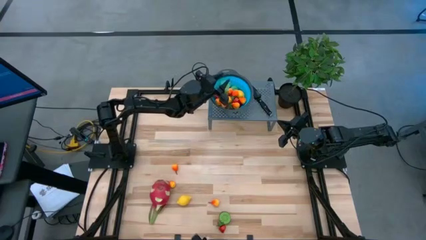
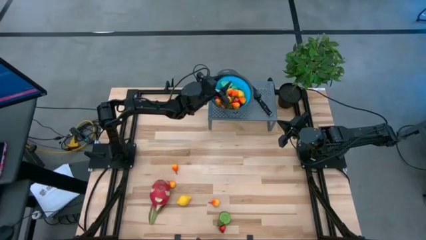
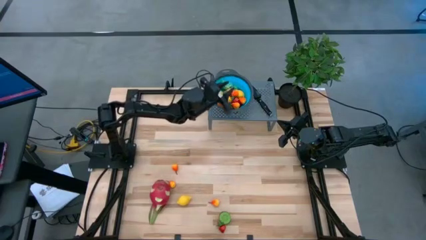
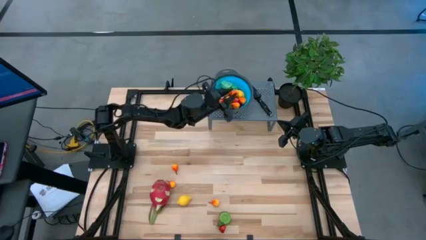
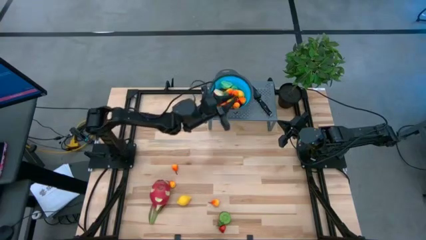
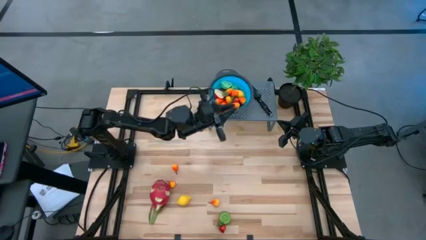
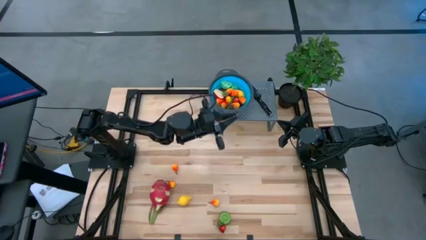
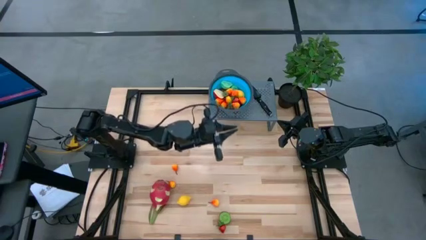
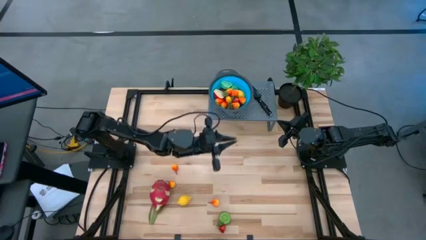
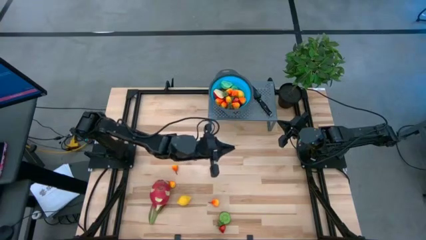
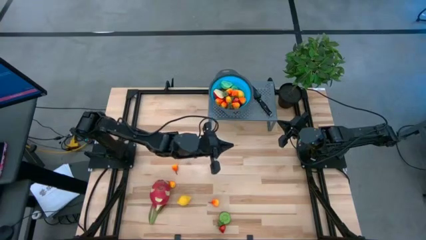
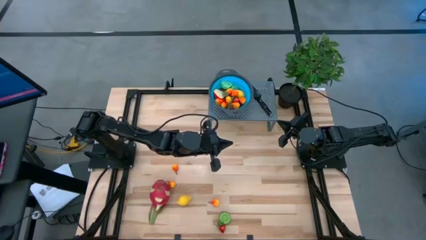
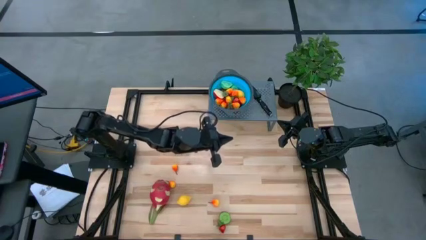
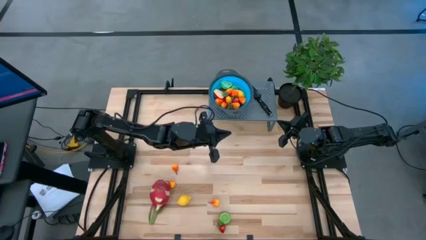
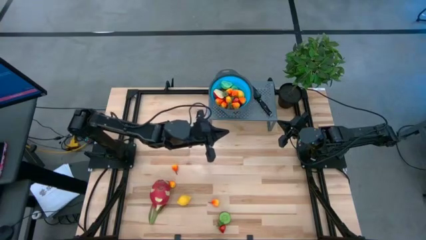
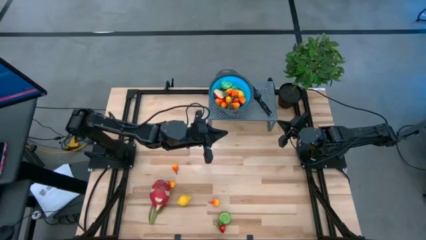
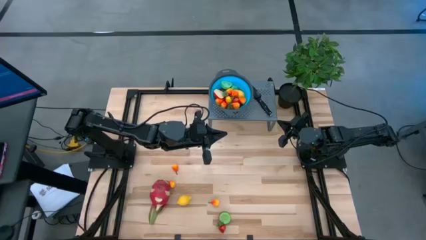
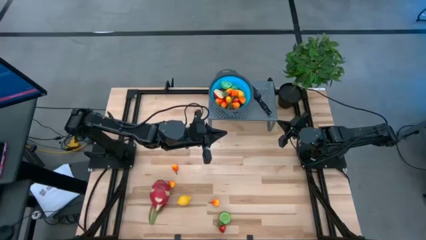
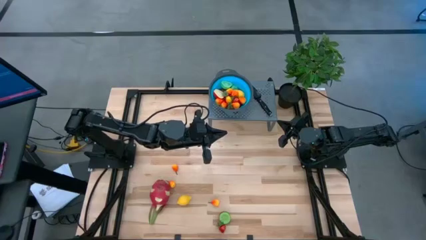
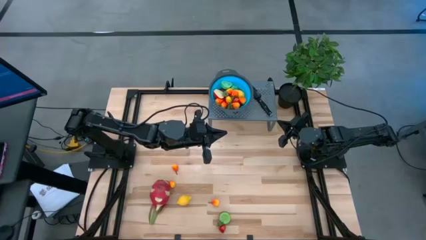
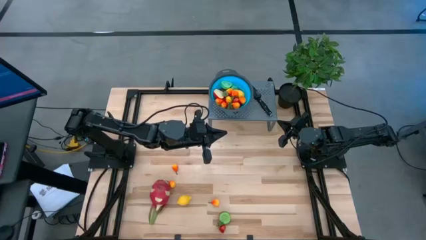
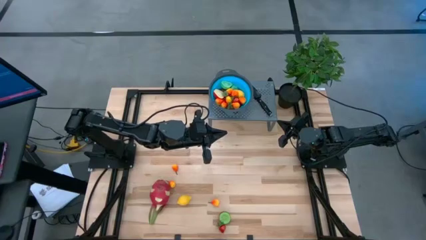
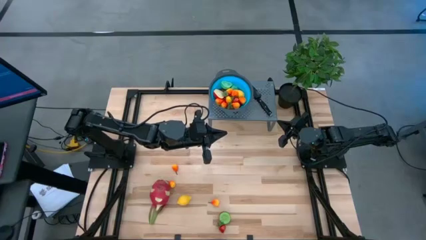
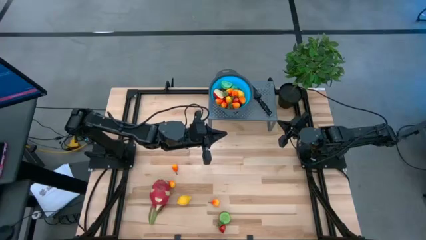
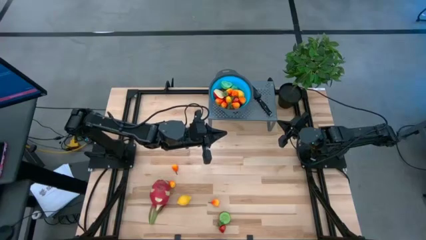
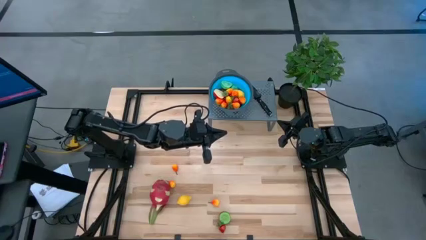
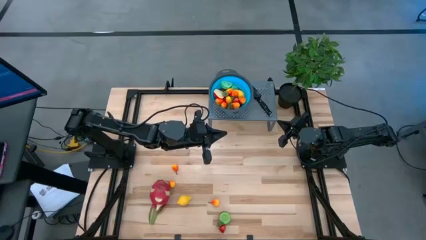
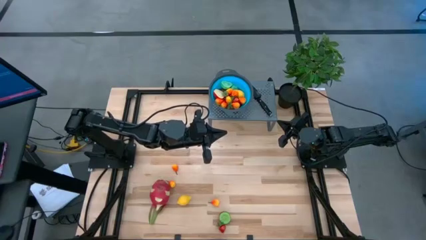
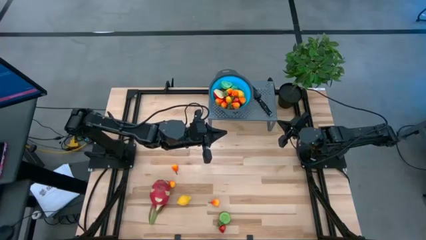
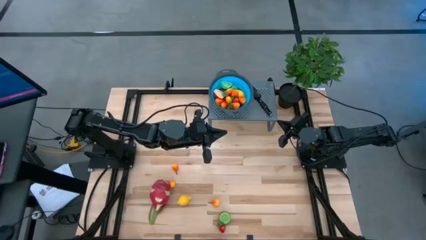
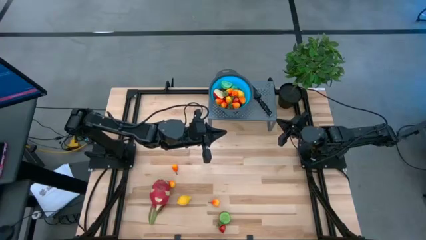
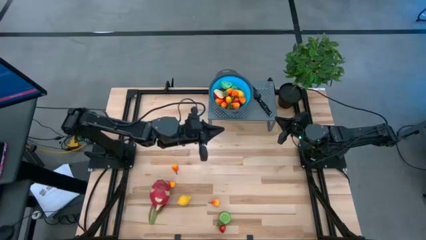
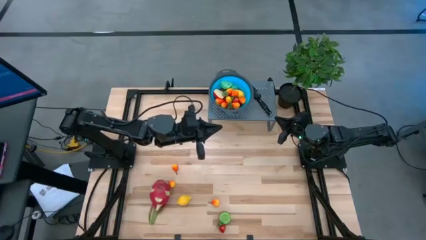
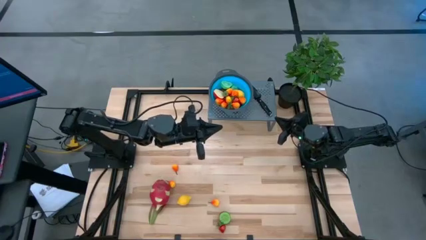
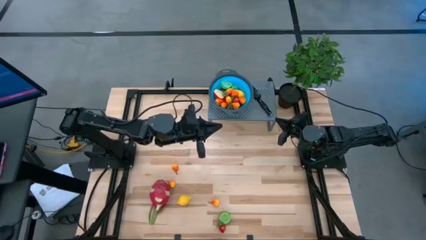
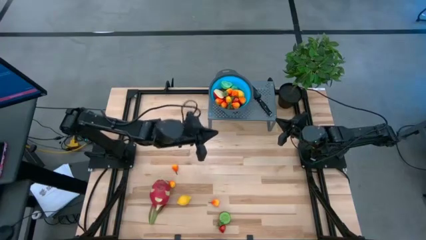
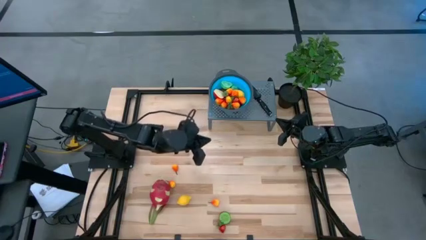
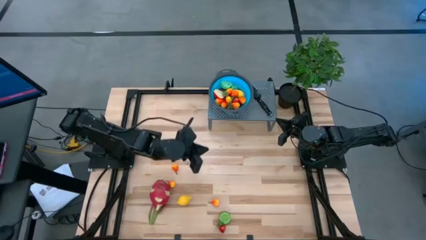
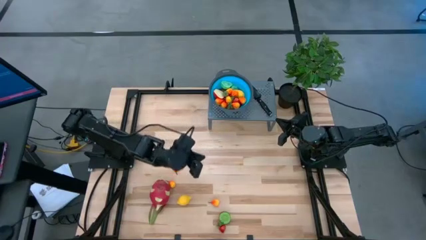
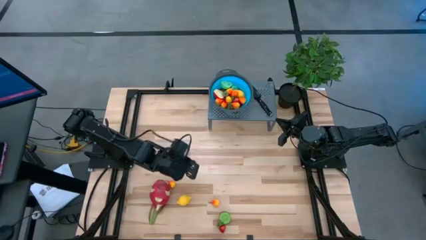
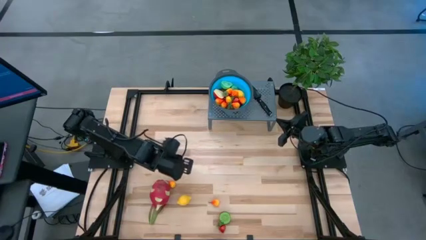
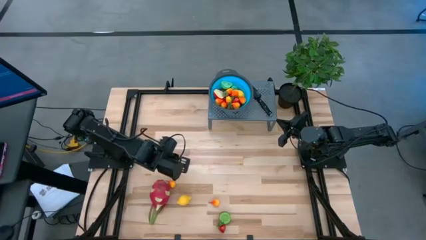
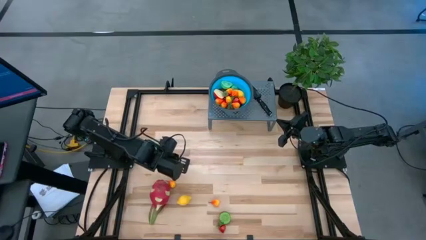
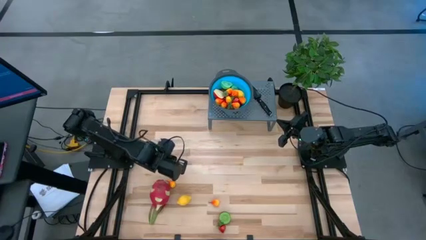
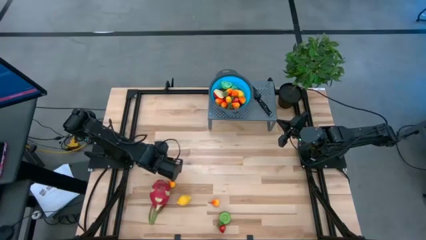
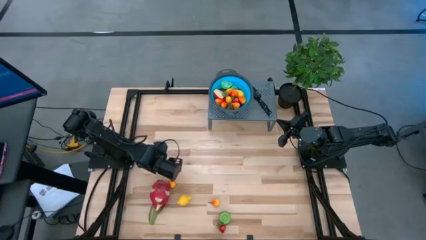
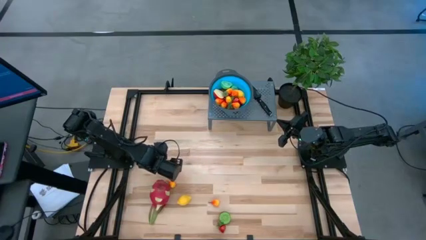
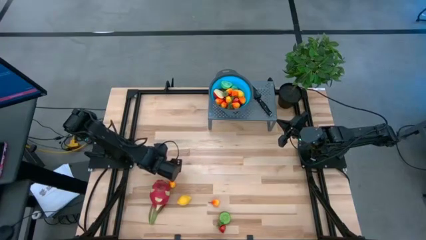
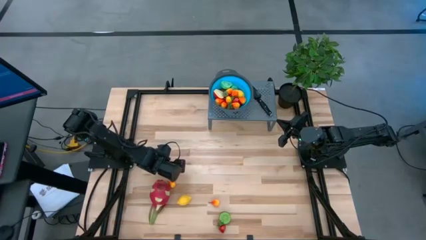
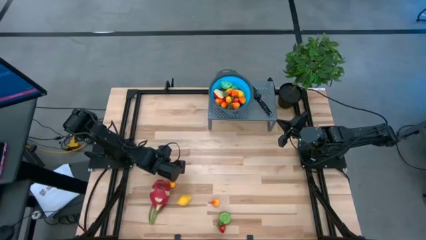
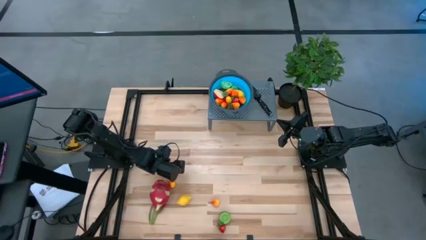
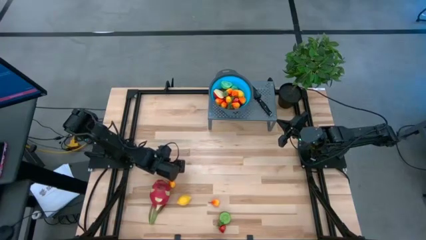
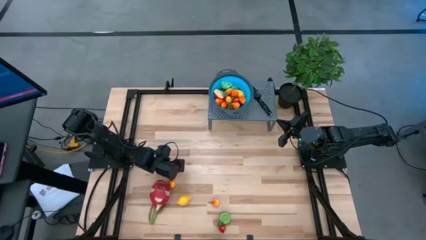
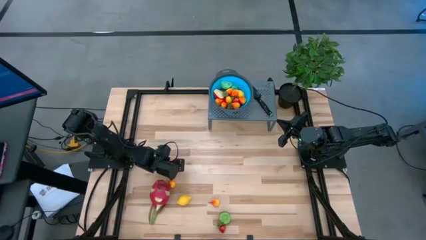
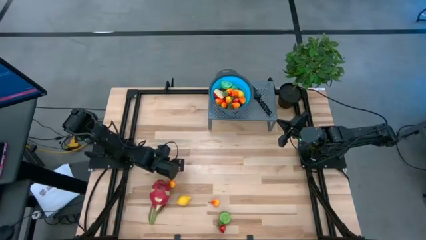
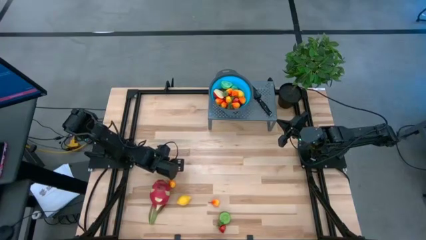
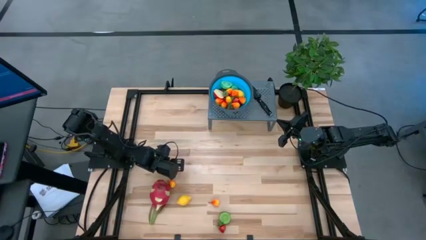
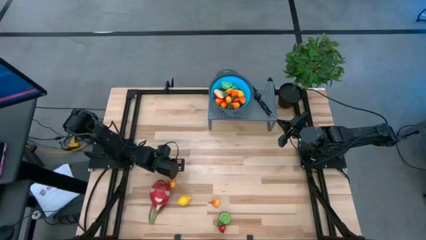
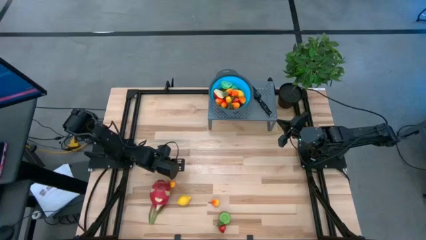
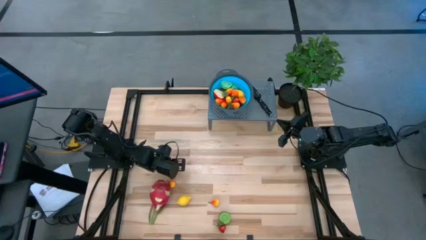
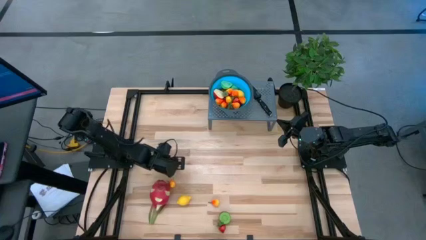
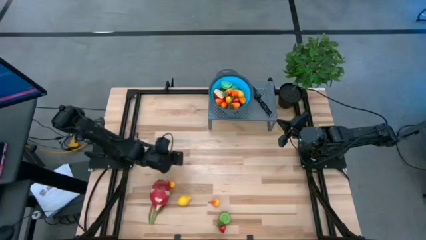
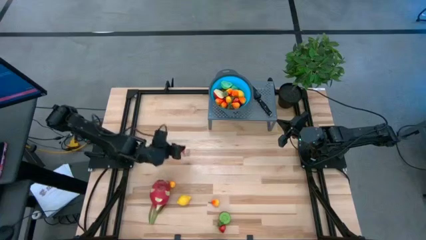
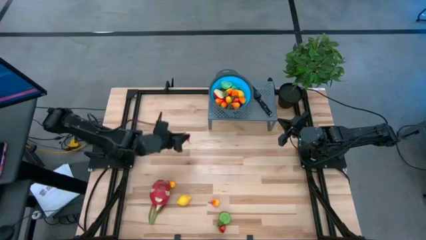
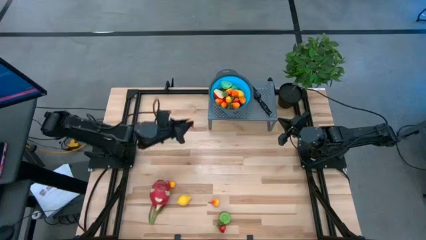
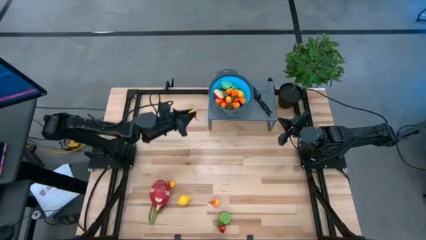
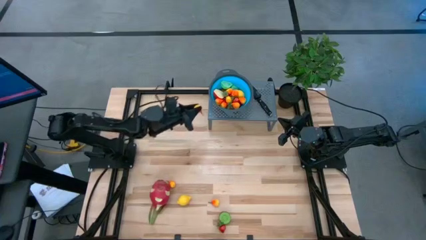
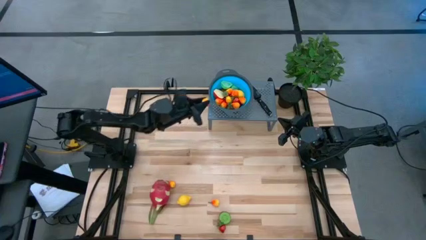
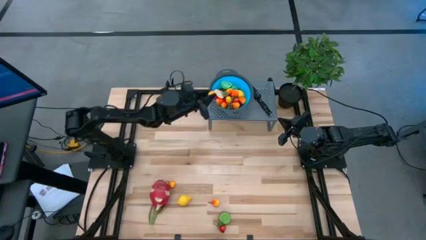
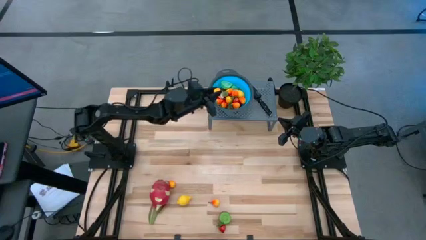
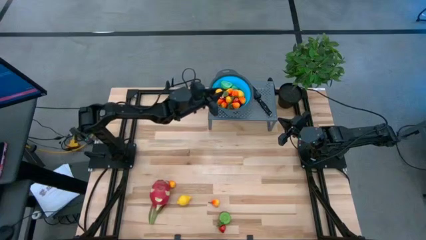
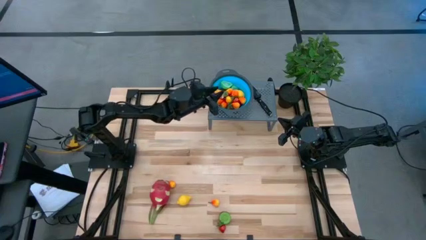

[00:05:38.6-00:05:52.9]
Task: Pick & Place Fruit
Put the top yellow pear into the strainer bowl

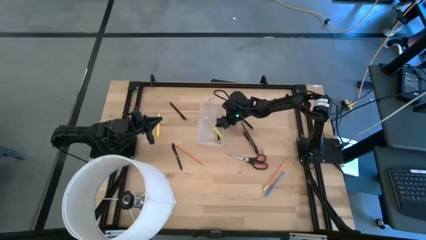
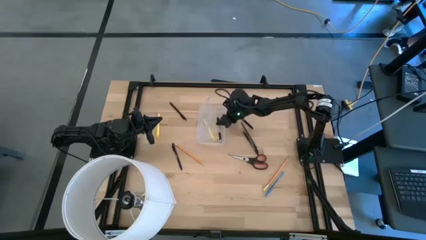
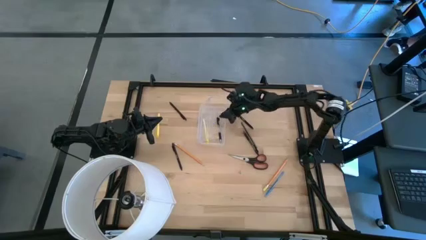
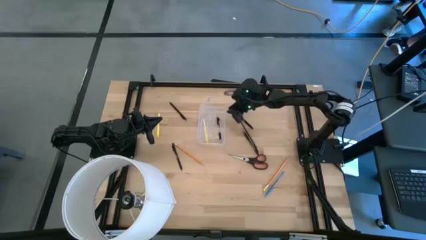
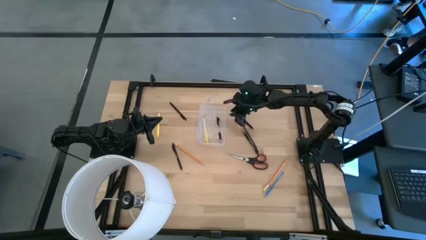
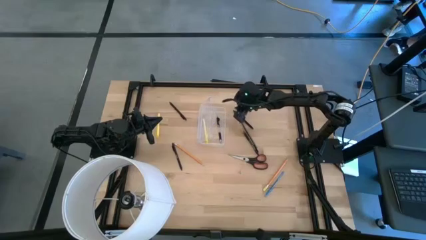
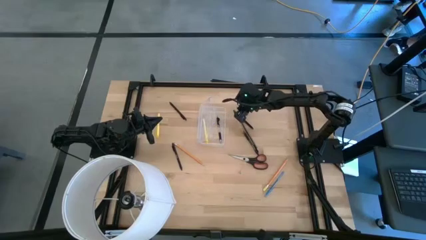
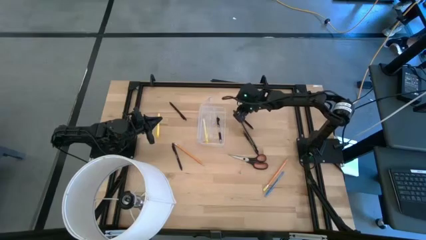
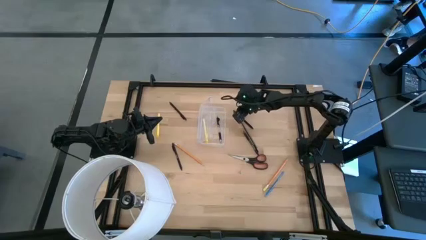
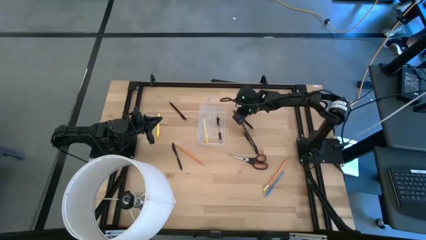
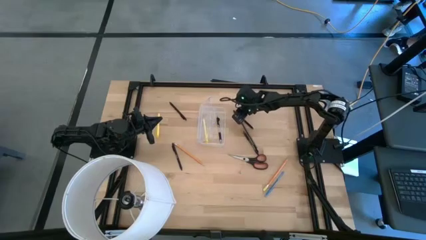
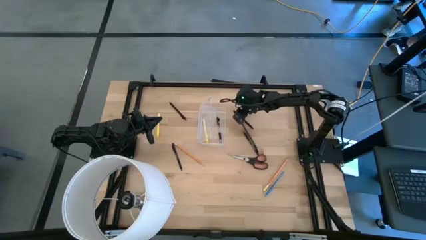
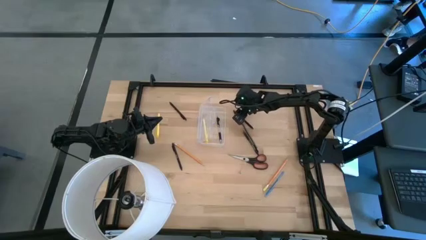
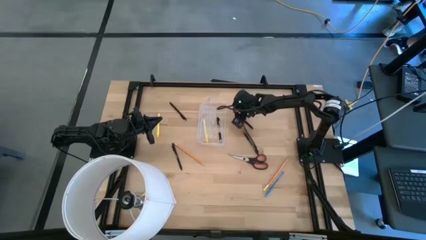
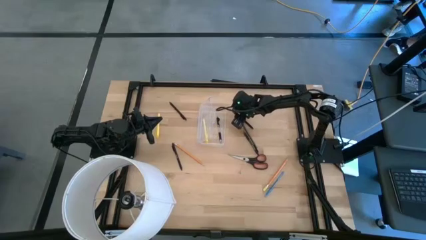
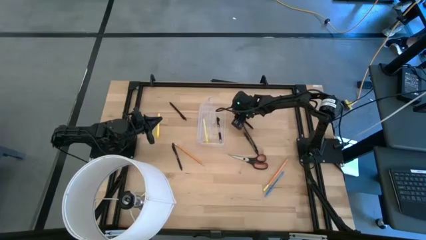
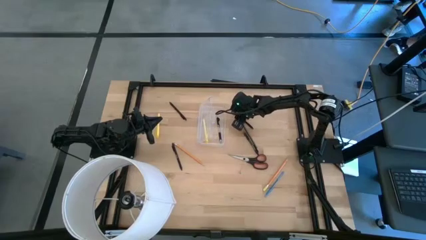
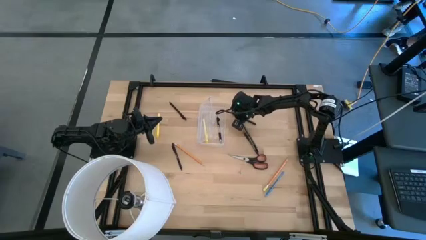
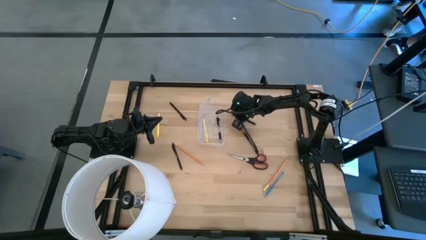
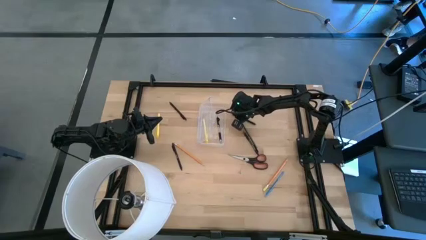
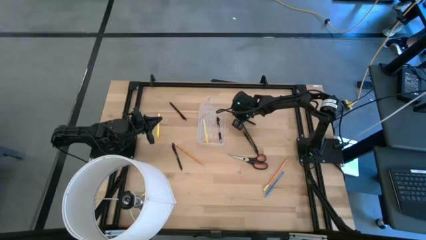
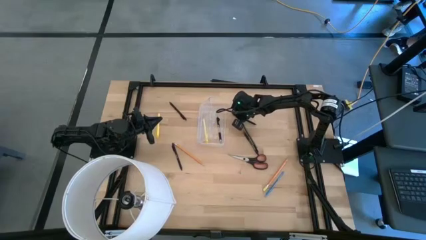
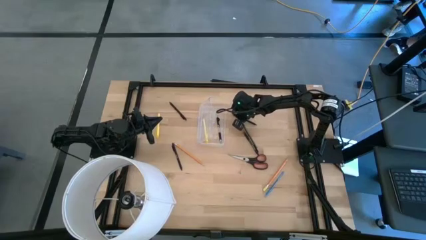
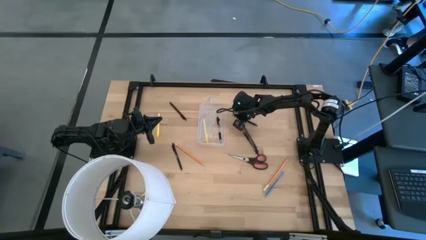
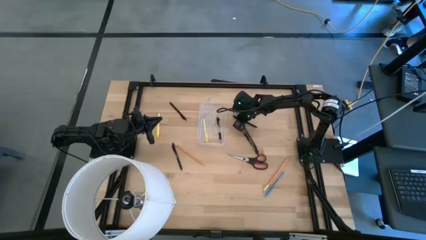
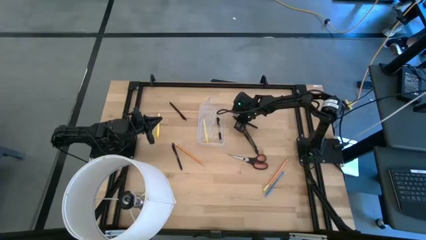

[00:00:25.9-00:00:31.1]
Task: Pick & place school supplies into a supply box
Put the top right black pen into the transparent supply box
